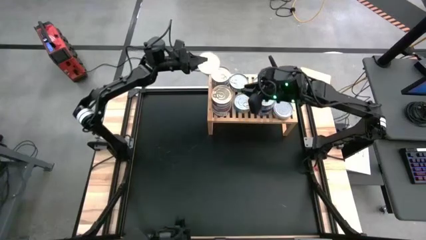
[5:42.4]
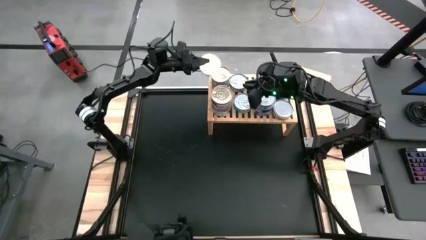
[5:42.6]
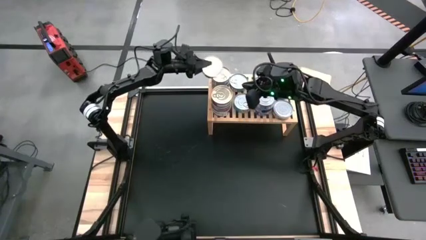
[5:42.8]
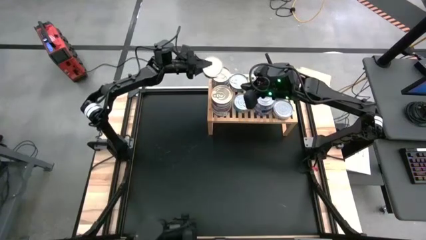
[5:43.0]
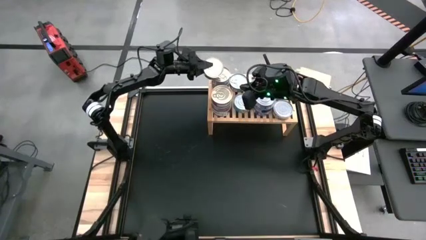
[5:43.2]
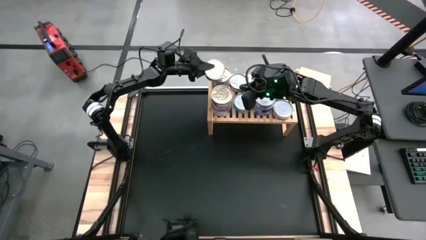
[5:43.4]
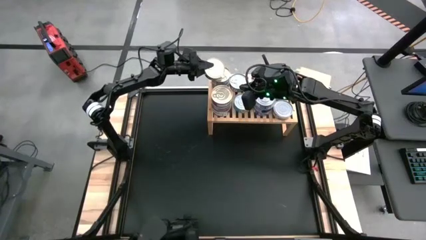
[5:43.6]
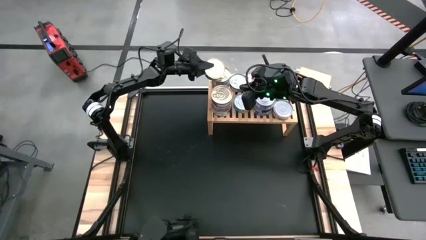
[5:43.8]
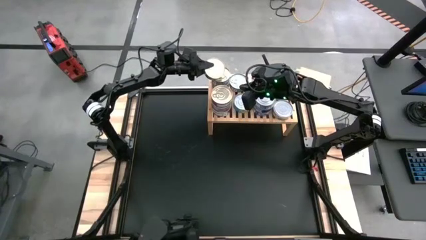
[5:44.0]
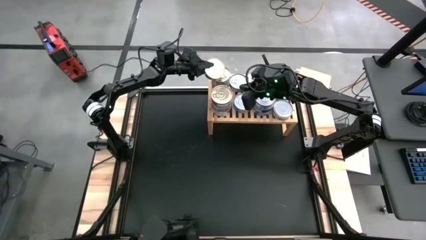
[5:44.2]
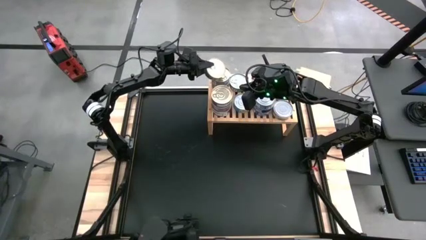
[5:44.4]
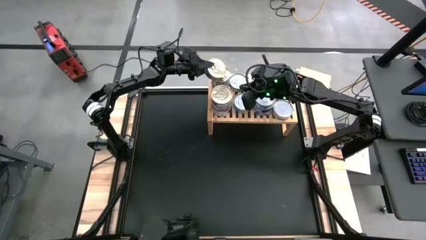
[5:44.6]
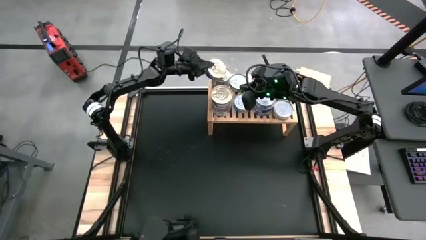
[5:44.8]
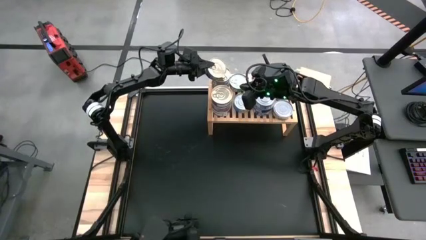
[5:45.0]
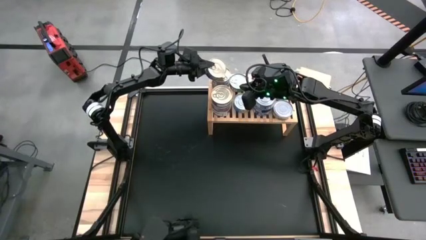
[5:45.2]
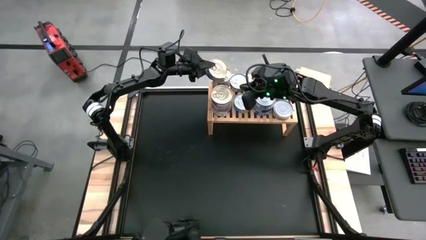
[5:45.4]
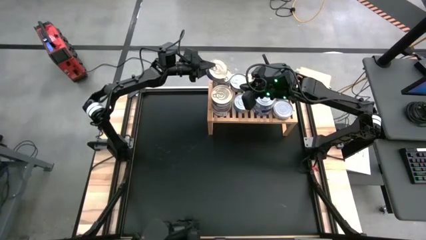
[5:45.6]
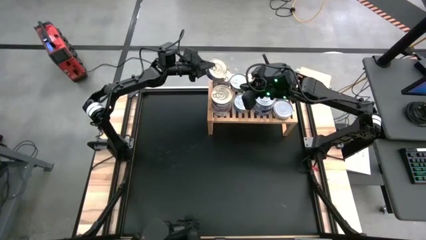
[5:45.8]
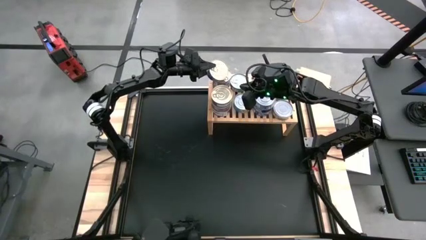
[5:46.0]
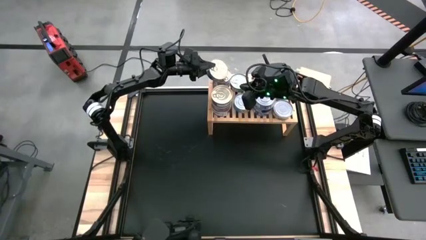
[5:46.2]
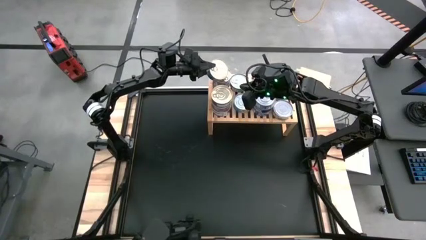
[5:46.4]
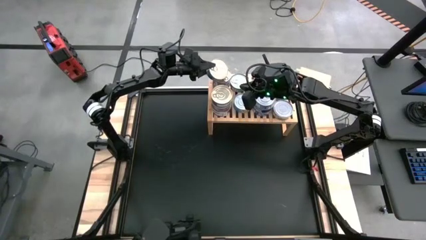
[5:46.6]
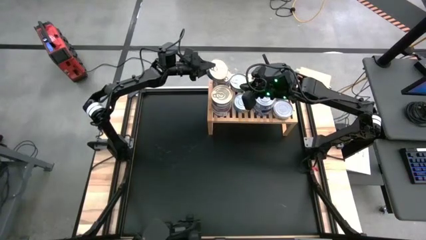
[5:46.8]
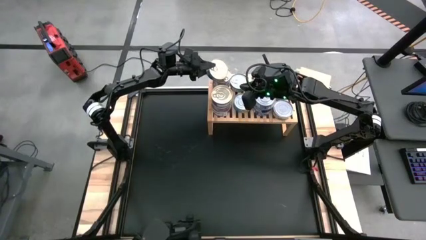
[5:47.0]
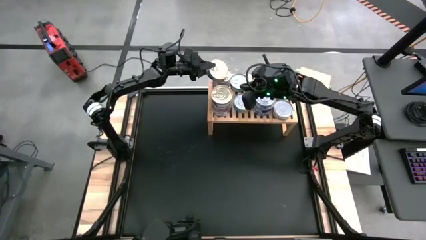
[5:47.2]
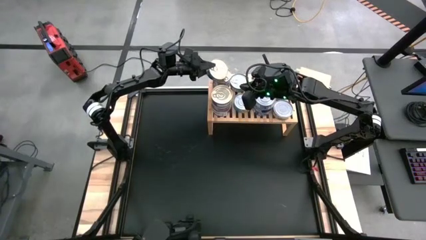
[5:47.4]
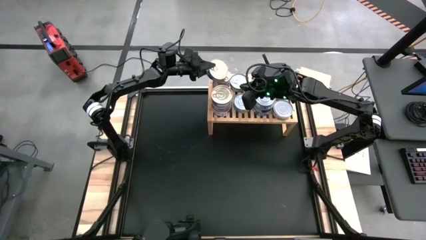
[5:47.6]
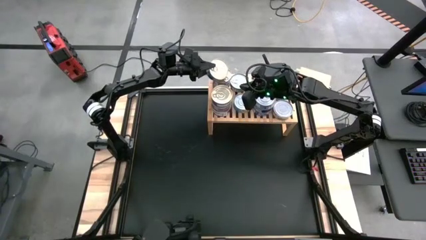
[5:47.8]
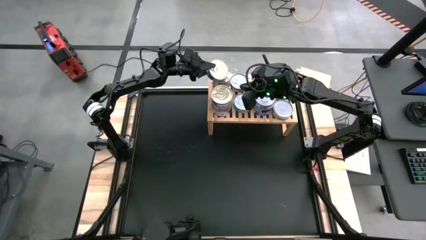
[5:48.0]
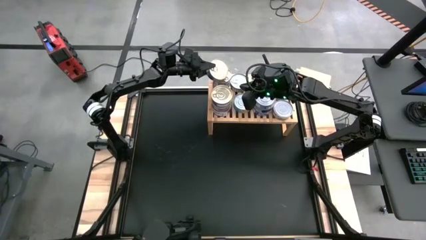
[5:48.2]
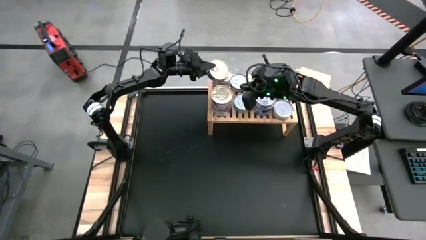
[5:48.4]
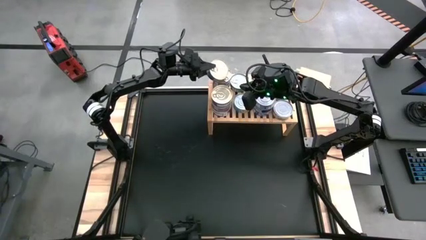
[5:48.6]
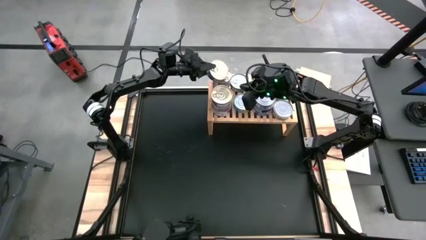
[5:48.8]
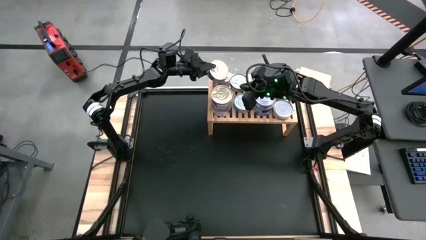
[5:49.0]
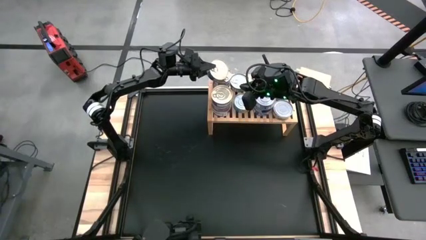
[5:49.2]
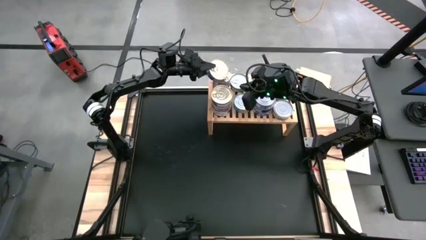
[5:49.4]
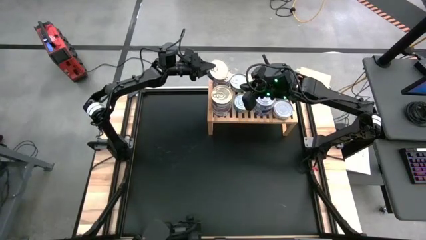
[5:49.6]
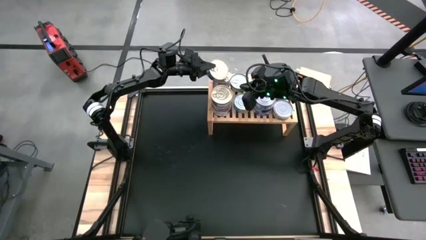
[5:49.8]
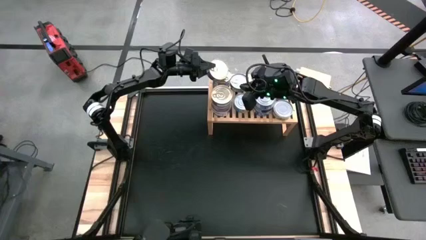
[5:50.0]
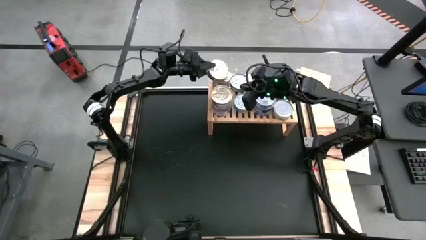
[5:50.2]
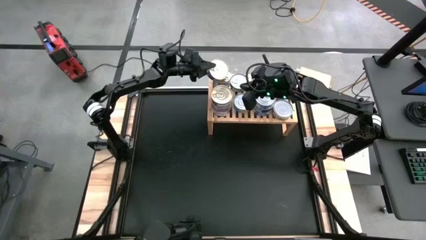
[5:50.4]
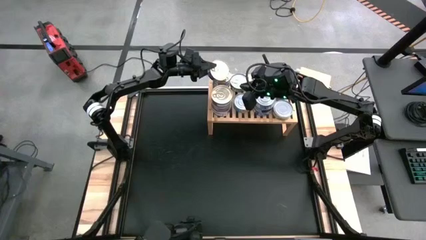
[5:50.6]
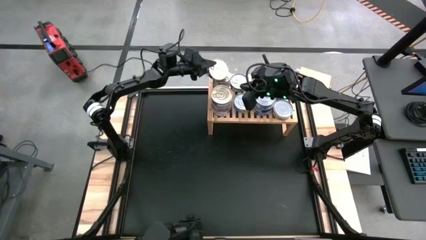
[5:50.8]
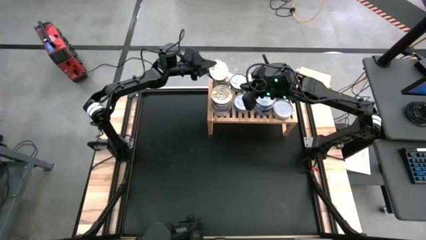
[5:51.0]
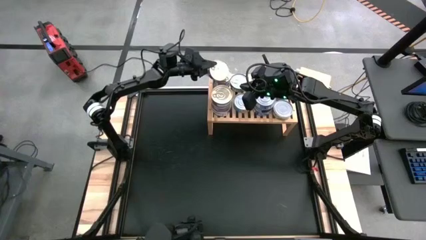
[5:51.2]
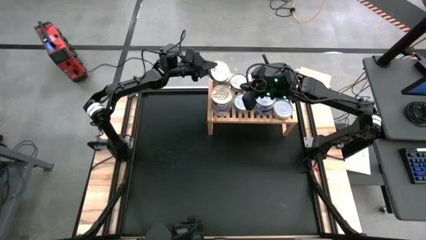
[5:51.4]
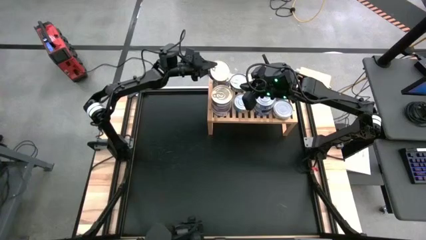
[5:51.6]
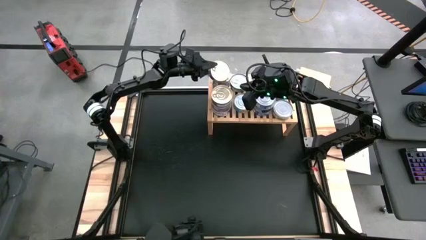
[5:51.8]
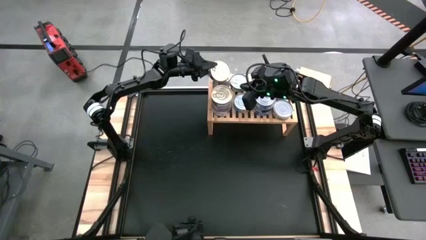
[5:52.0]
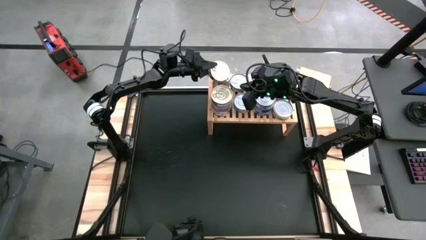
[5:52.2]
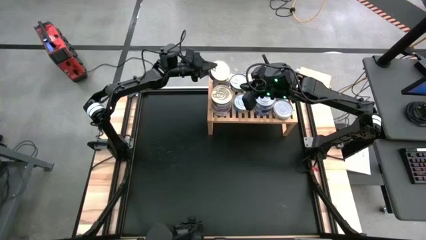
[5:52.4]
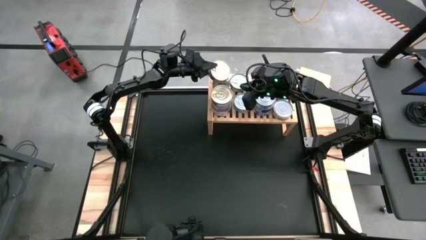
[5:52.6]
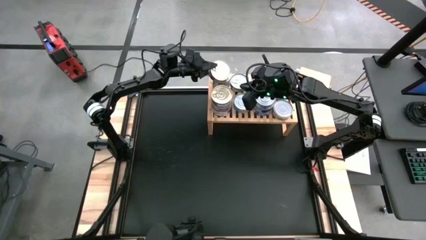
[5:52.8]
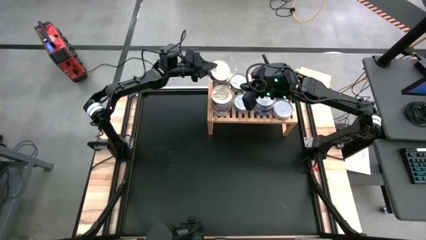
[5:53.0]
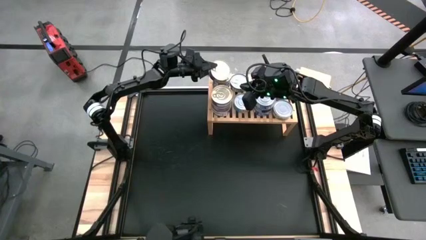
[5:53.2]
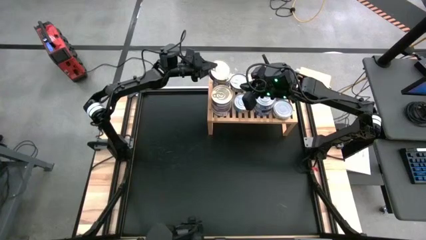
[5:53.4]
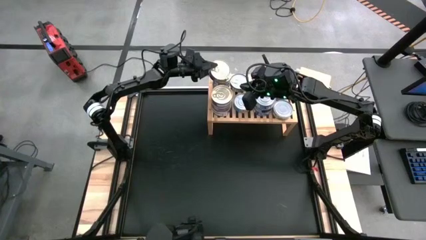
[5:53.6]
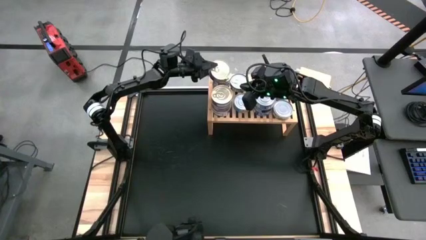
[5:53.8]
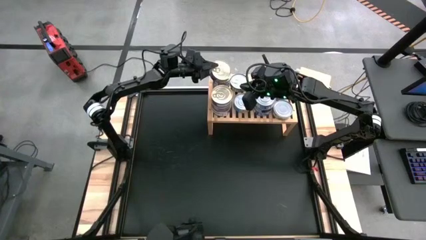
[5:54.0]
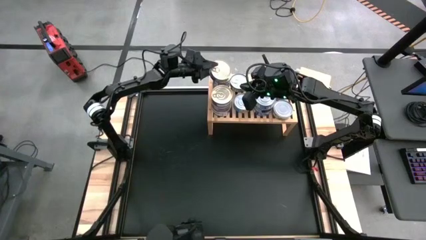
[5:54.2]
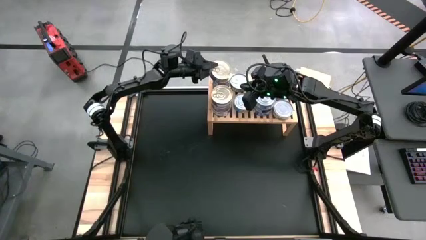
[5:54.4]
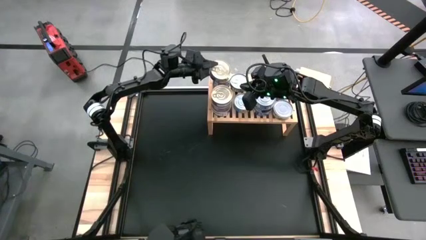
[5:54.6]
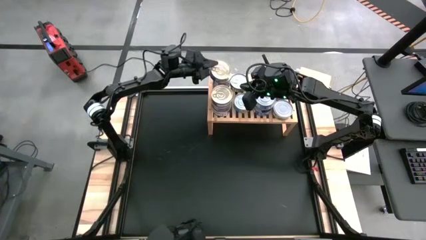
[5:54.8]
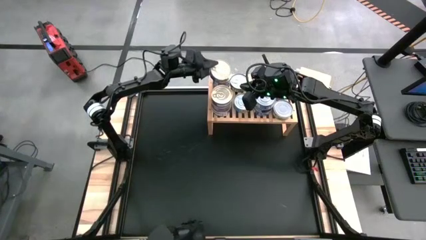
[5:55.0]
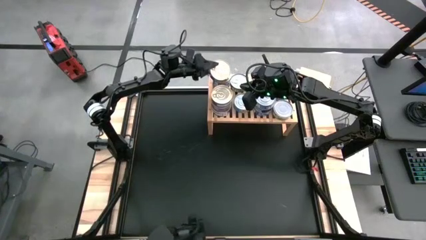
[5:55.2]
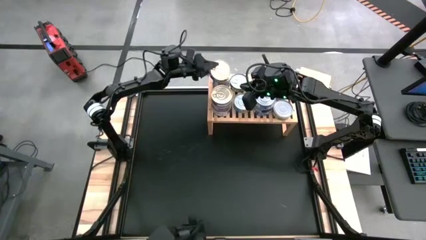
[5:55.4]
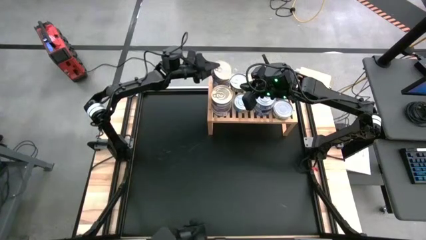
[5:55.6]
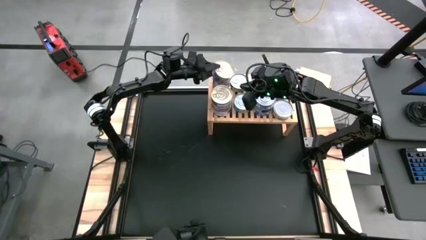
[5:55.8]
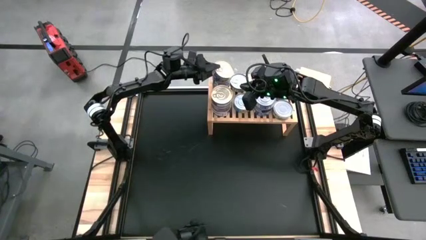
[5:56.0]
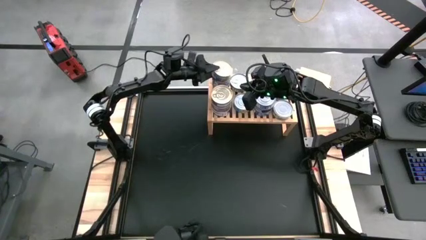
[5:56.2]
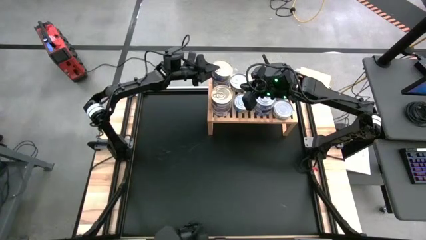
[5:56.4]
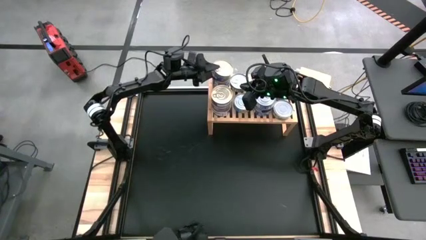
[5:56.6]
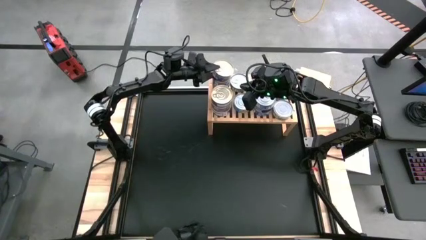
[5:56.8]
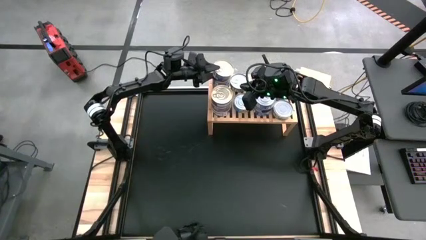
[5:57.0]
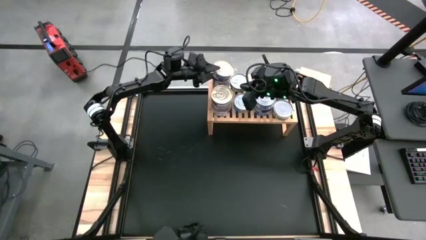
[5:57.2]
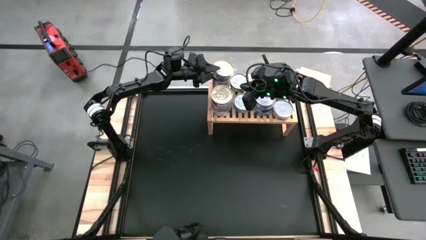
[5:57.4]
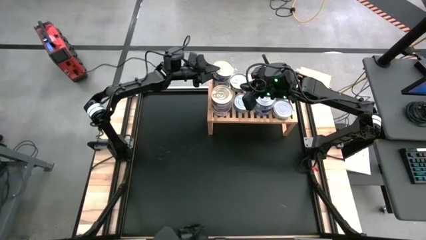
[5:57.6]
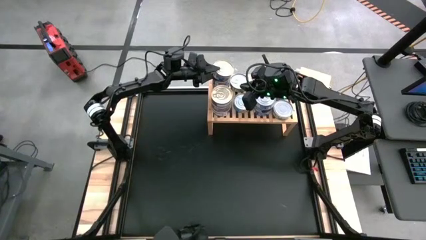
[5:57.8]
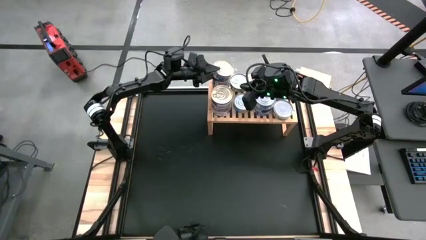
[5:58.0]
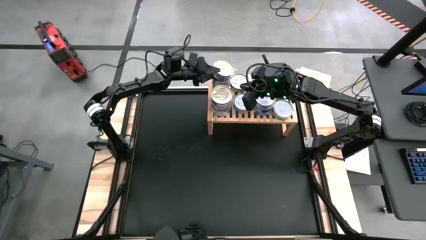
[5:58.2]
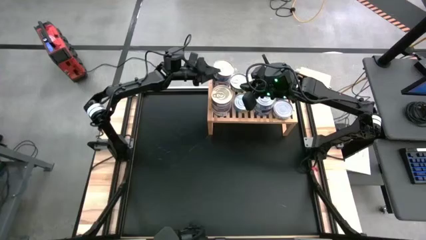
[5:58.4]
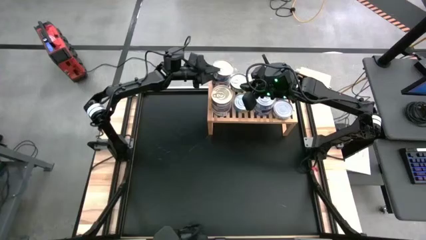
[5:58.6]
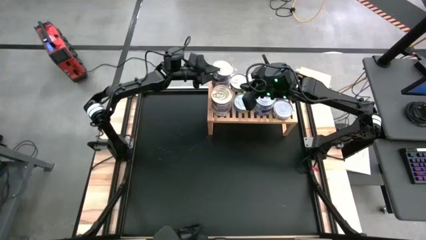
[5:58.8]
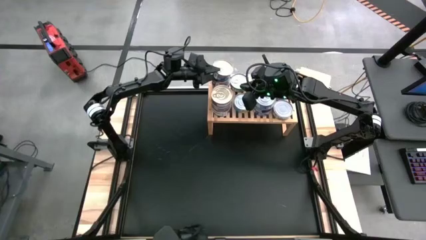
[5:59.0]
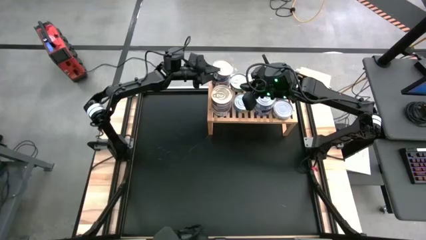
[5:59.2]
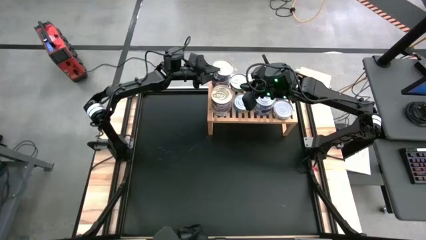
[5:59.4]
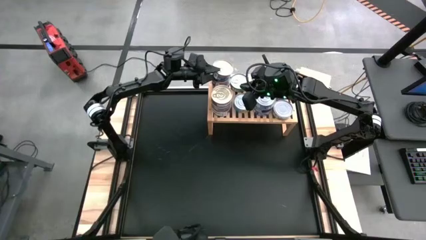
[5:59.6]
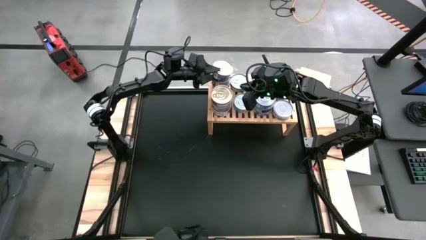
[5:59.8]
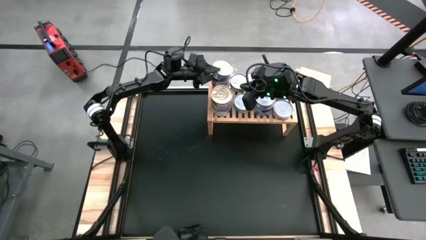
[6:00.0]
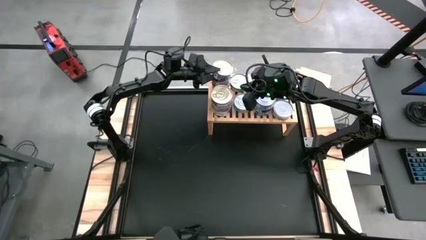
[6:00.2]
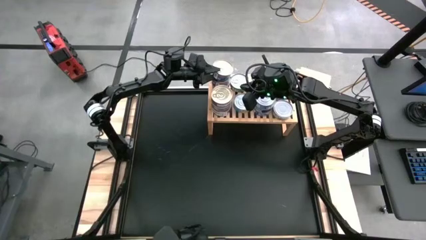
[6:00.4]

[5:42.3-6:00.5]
Task: Stack canned seafood by type on shelf
Stack the blue-pink tuna can on top of the blue-pink tuna can on the shelf
